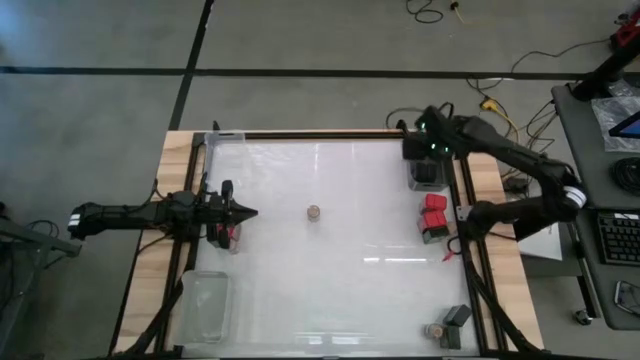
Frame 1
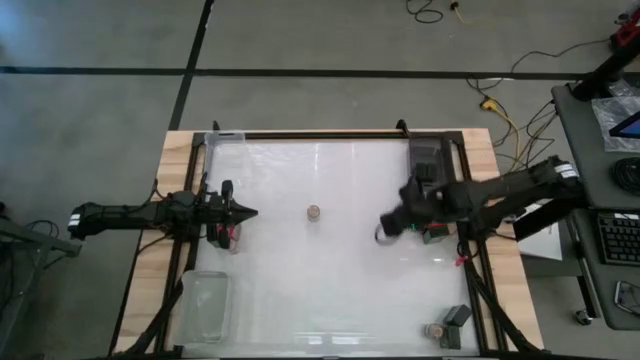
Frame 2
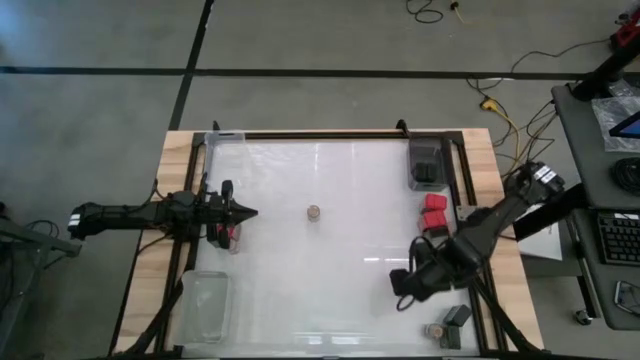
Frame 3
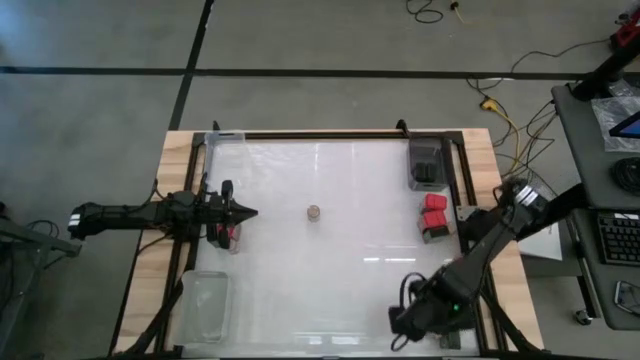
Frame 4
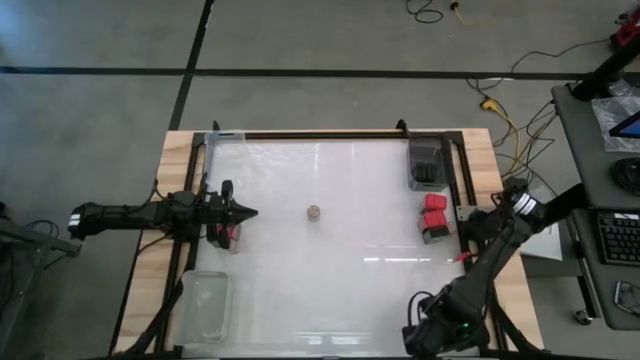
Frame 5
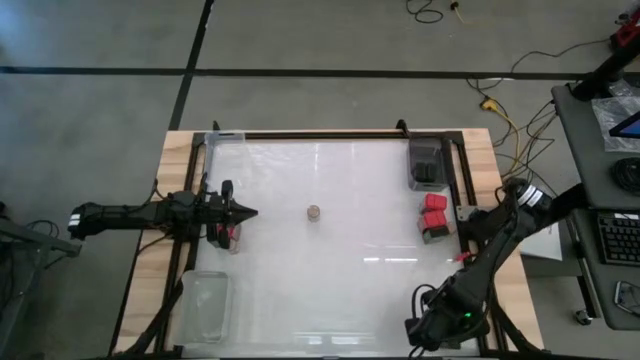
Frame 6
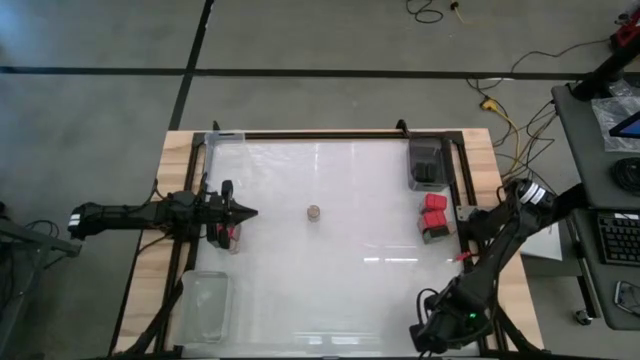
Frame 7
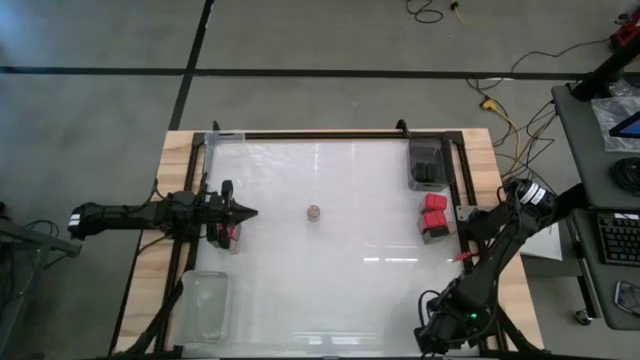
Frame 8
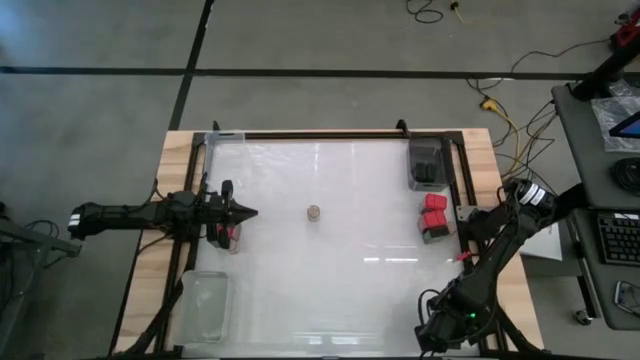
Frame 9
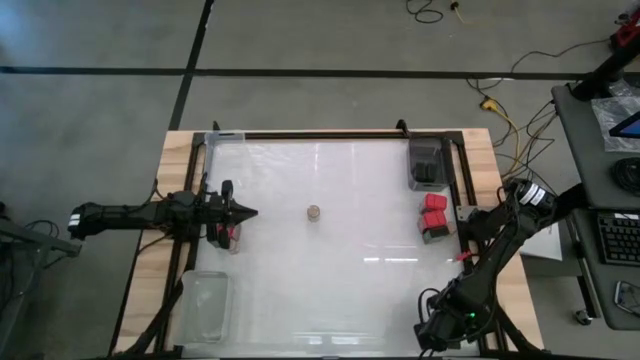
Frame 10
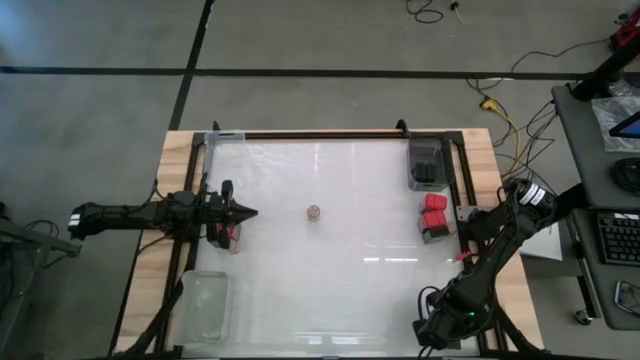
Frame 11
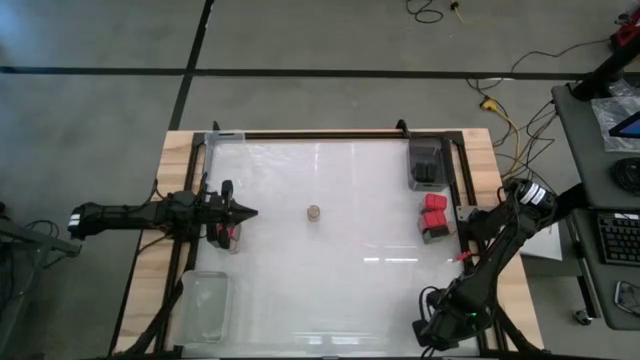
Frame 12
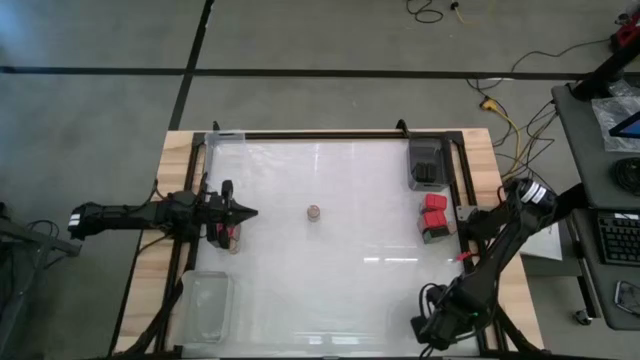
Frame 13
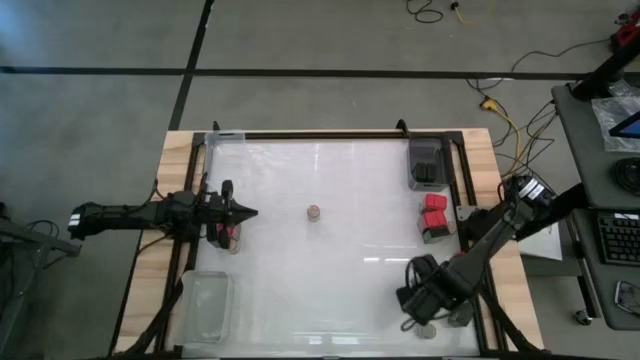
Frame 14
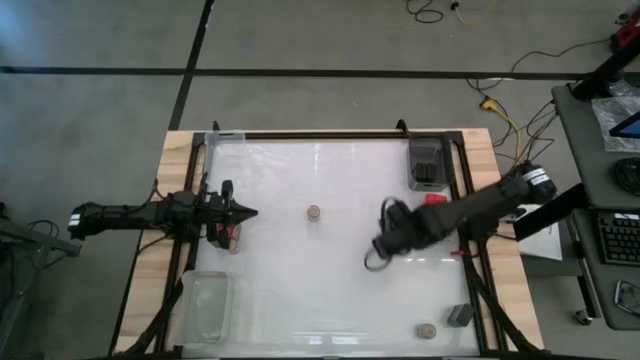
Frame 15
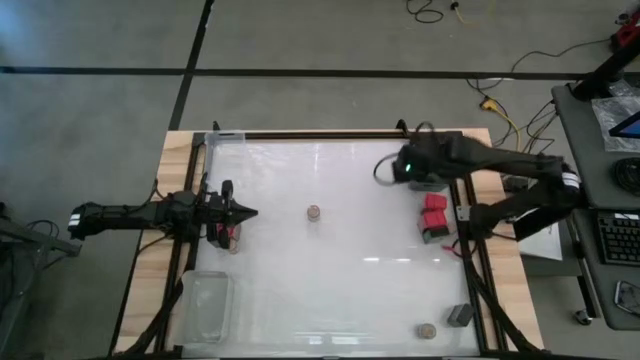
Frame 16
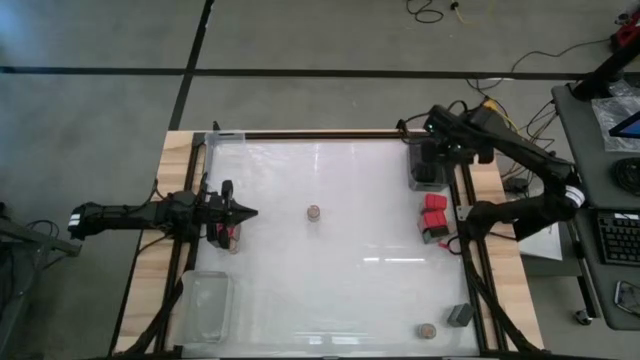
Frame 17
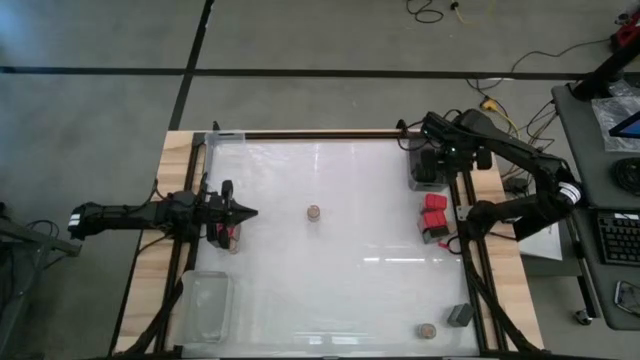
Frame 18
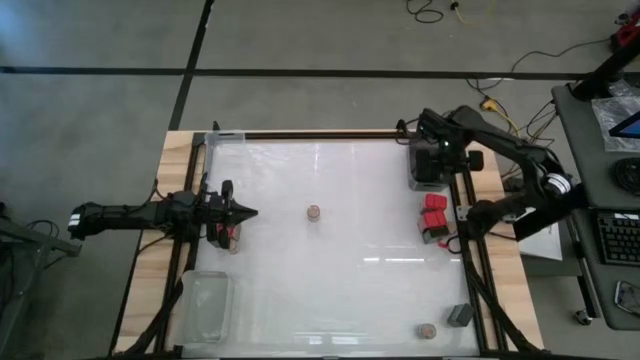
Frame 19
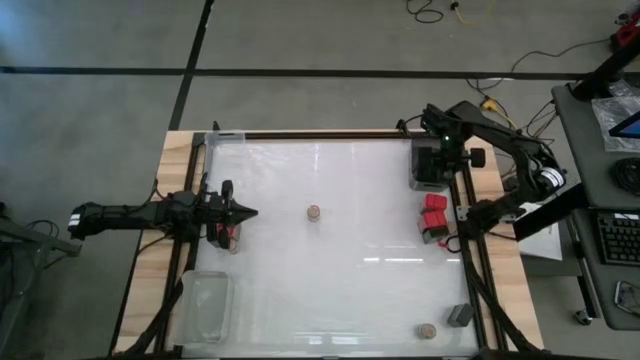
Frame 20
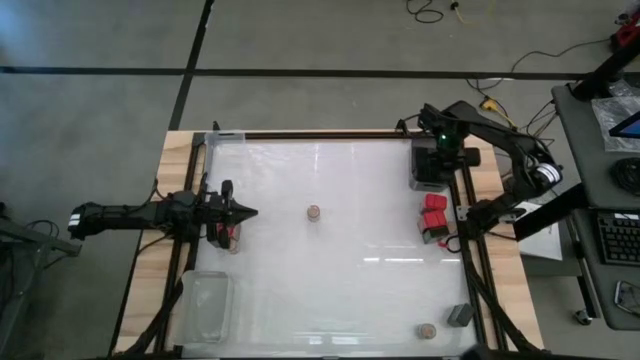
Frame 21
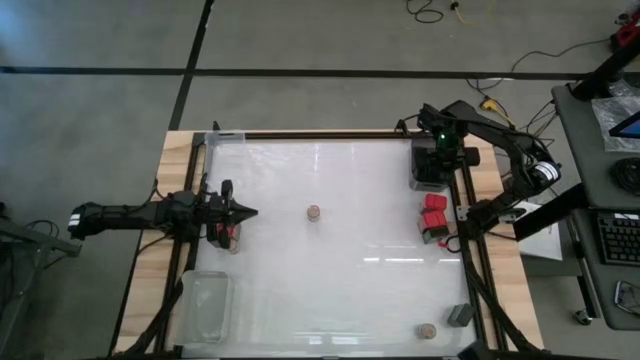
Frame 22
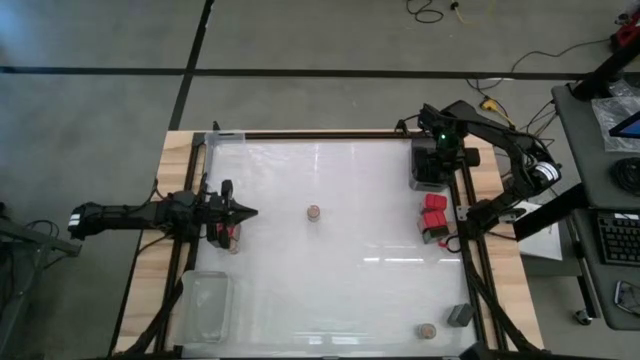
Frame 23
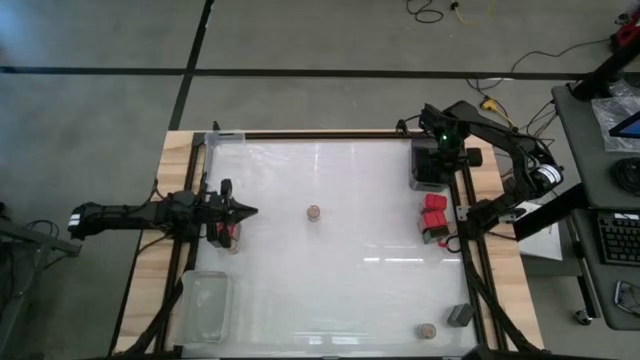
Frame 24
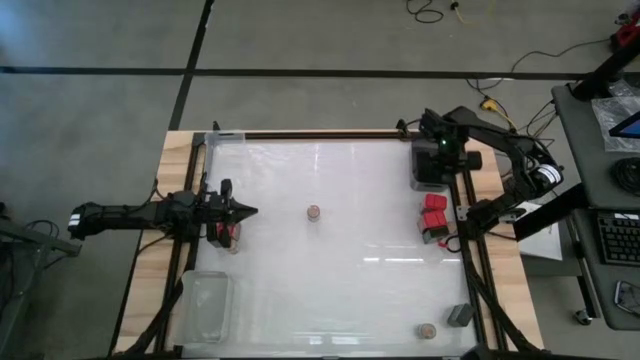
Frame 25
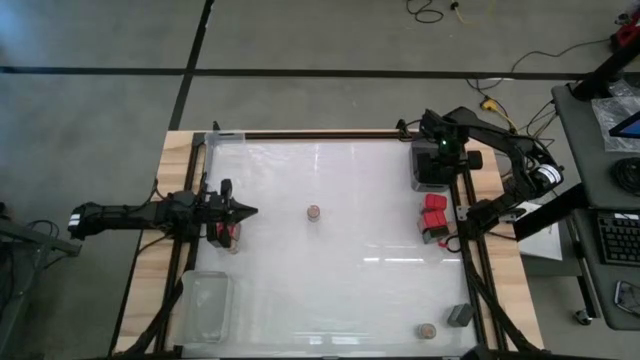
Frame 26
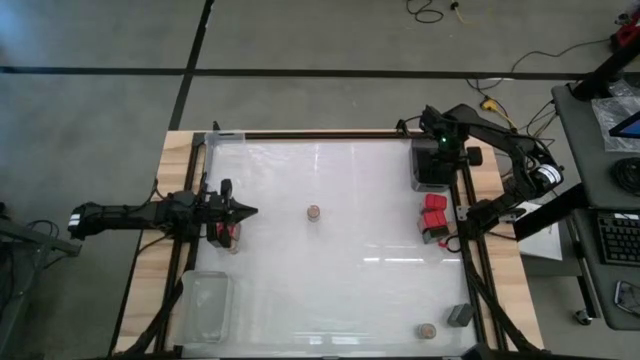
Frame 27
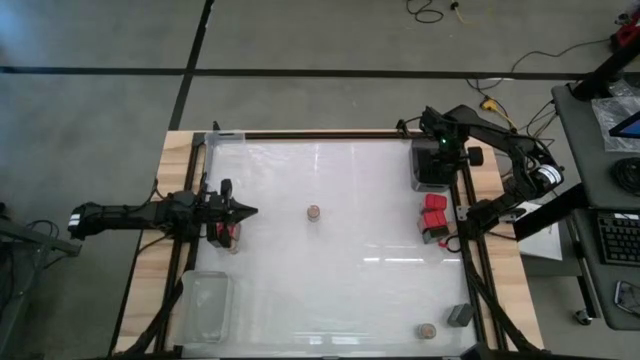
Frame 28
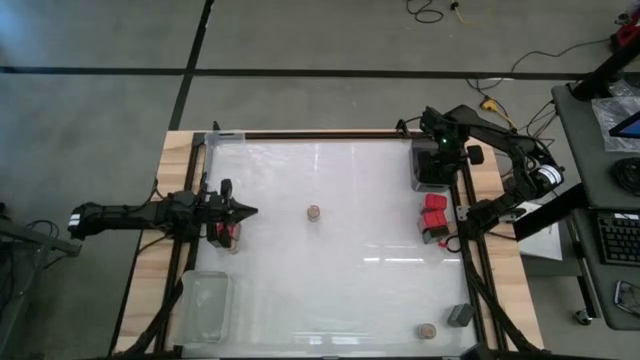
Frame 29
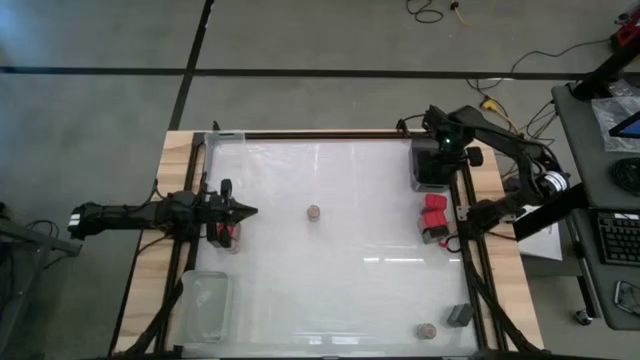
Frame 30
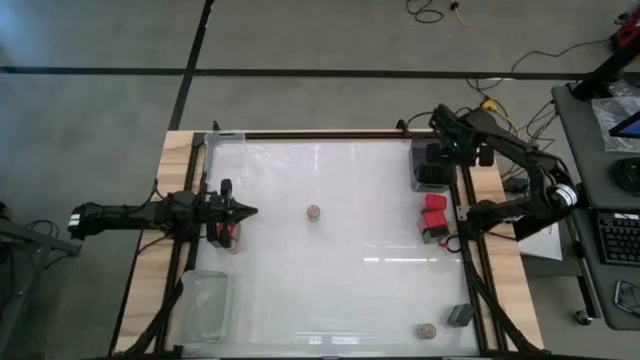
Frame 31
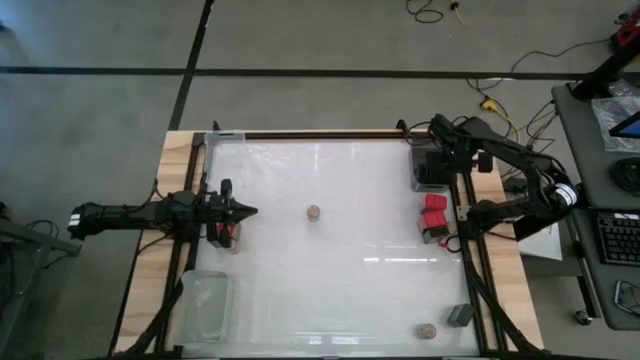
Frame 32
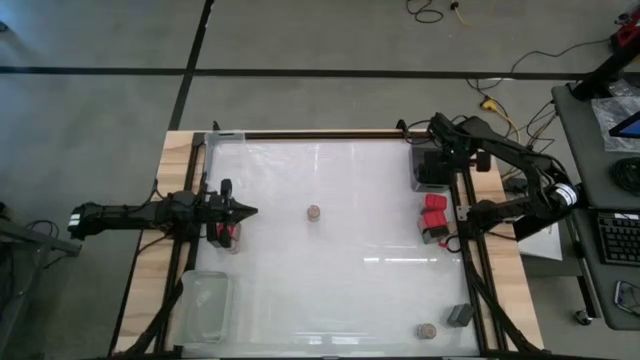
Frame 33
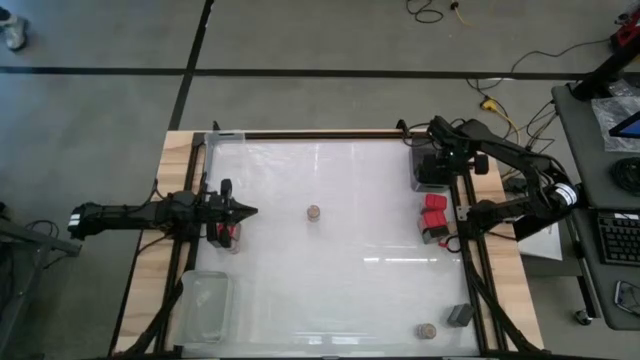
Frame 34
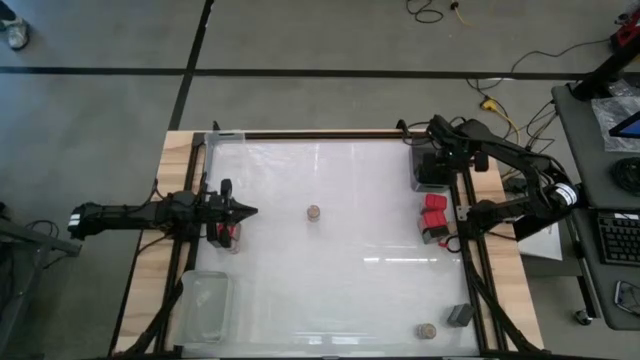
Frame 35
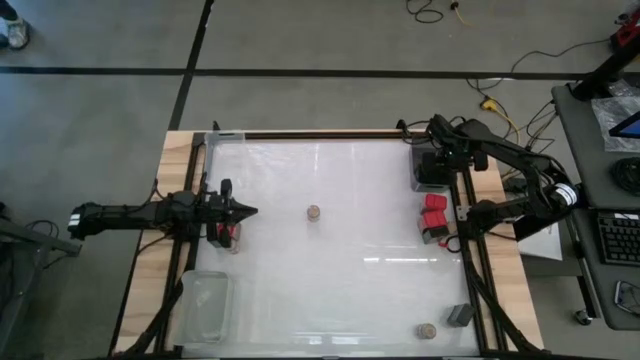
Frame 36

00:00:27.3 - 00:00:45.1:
Task: Sort spices by type
Put the black seasoning can into the black bin

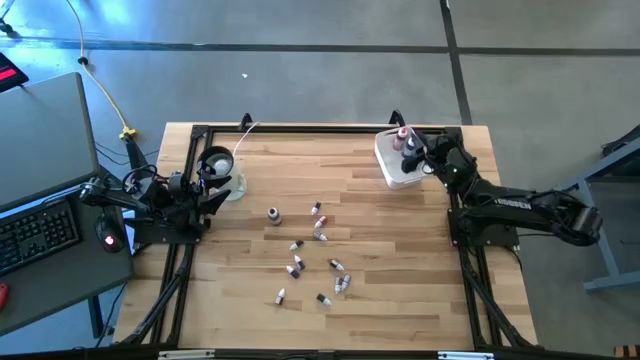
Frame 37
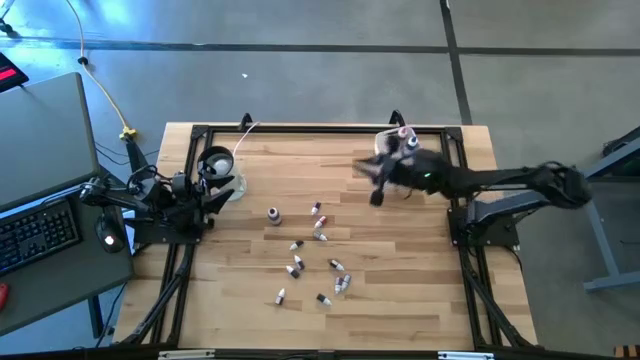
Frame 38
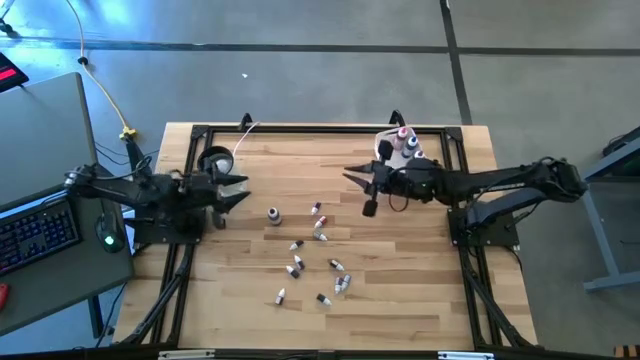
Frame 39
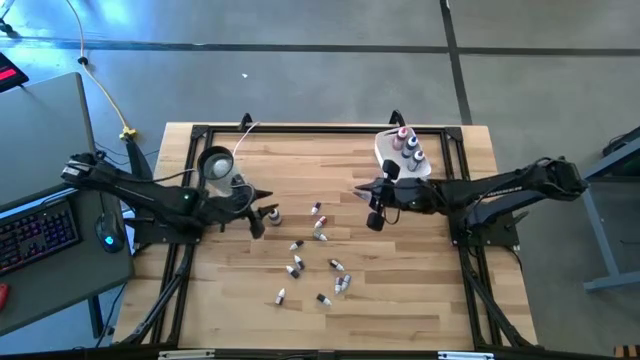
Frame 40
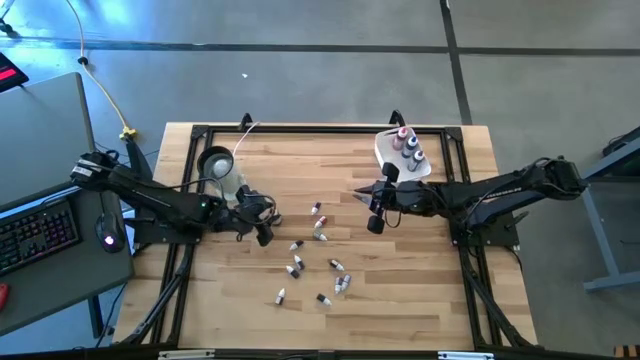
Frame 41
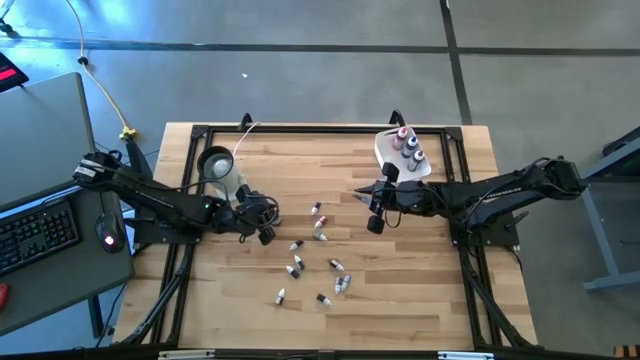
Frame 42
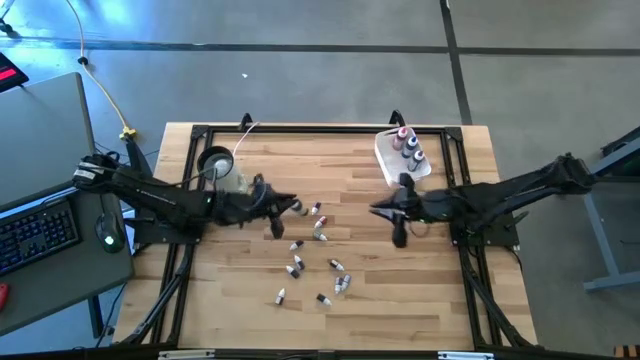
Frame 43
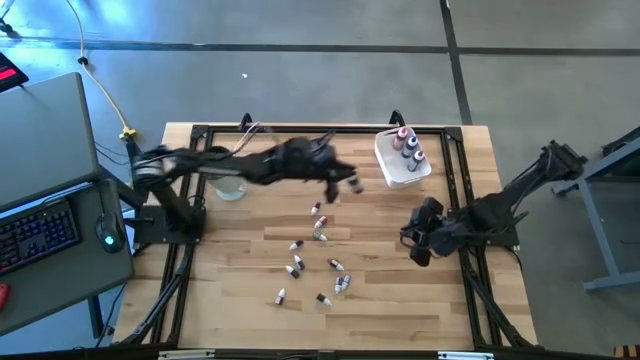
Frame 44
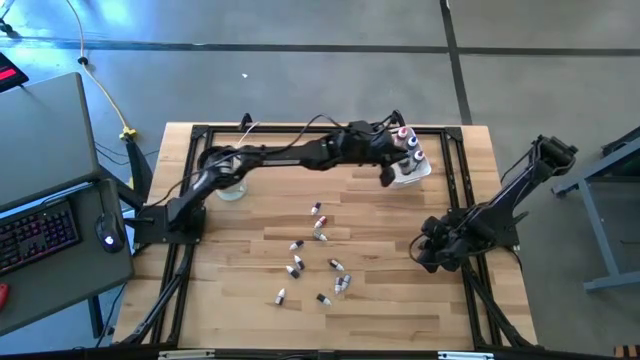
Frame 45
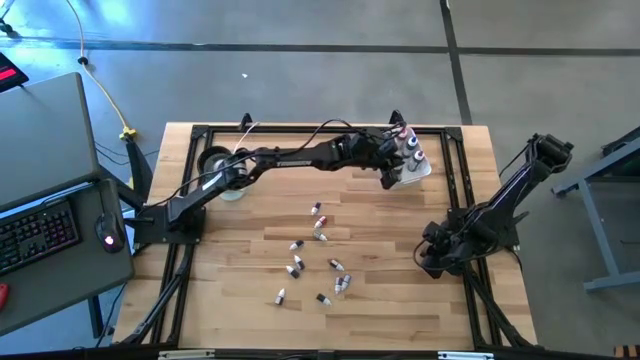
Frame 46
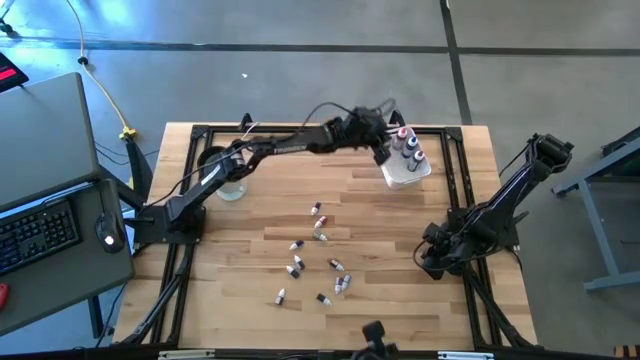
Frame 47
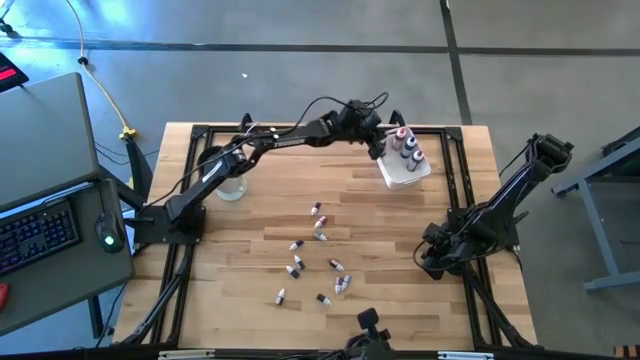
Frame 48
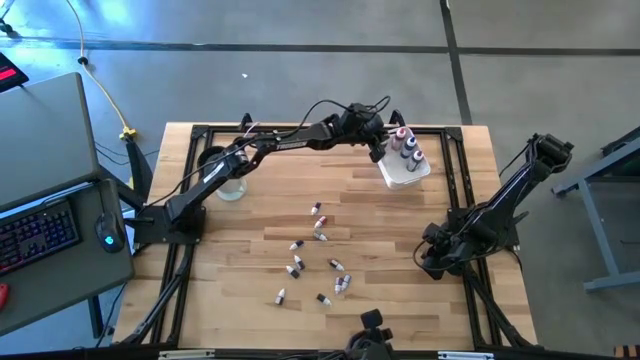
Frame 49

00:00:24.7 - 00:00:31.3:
Task: Pick & Place food coloring
Put the big black food coloring bottle into the white bin
